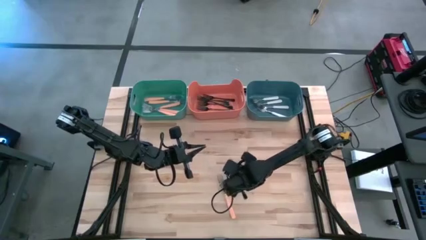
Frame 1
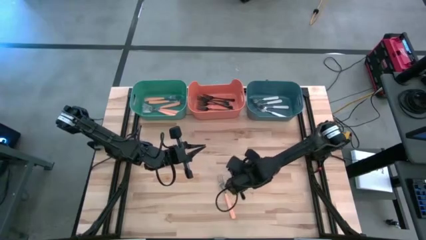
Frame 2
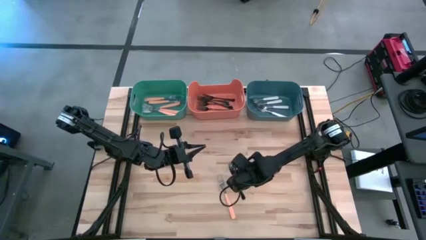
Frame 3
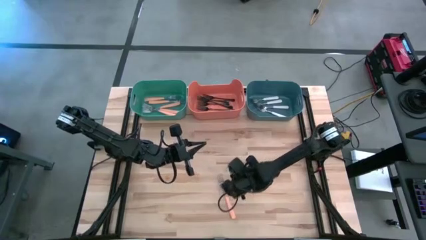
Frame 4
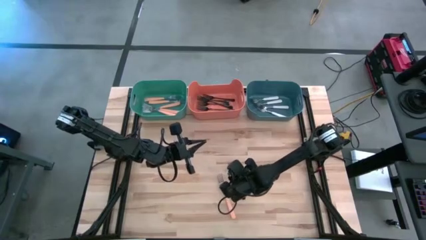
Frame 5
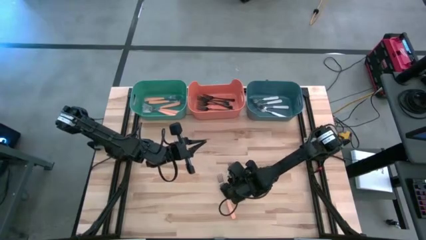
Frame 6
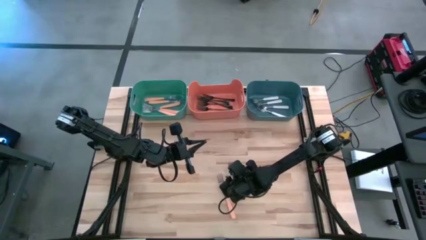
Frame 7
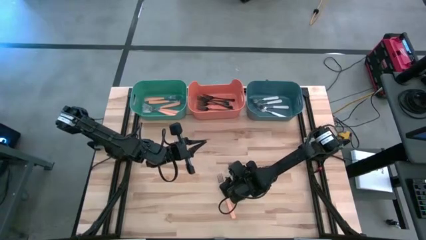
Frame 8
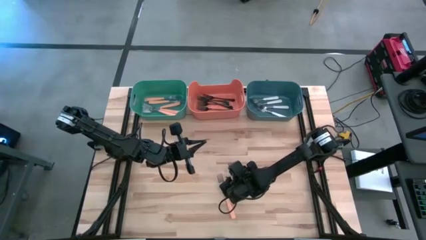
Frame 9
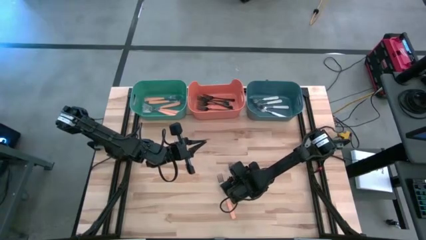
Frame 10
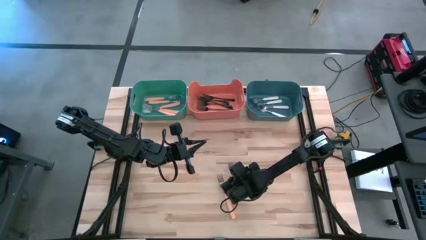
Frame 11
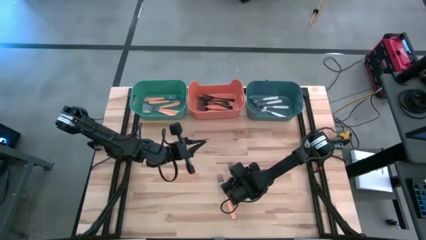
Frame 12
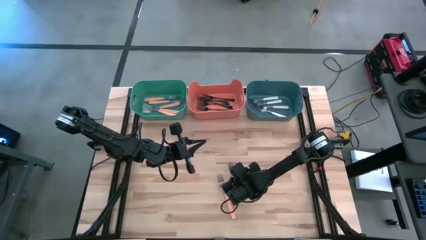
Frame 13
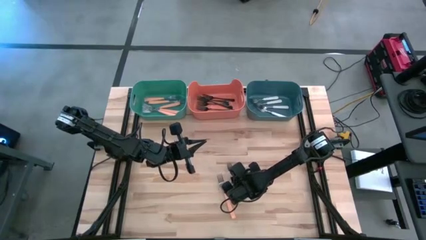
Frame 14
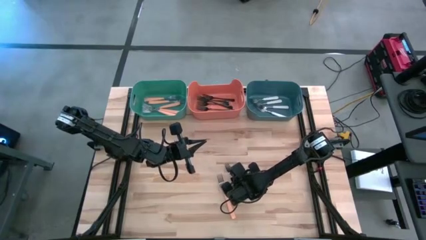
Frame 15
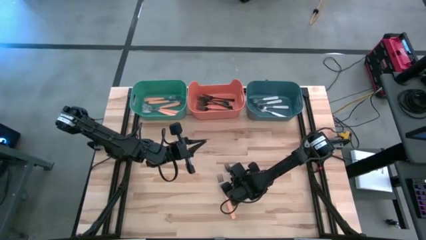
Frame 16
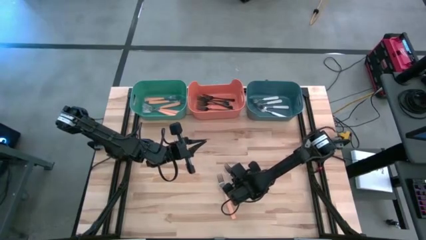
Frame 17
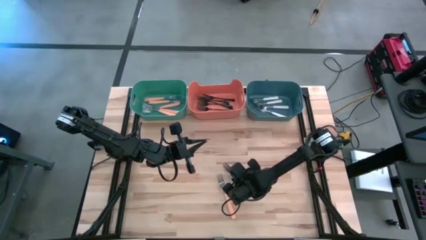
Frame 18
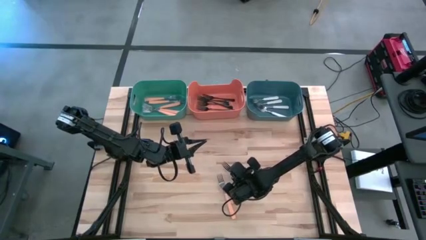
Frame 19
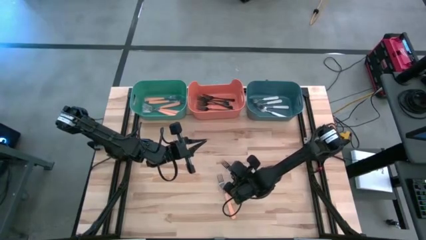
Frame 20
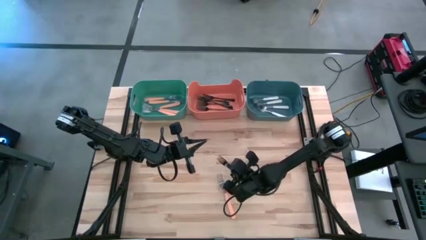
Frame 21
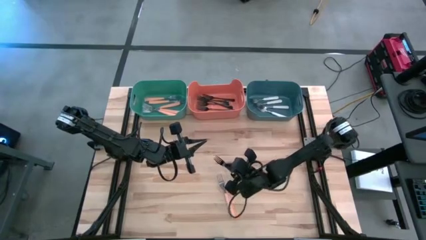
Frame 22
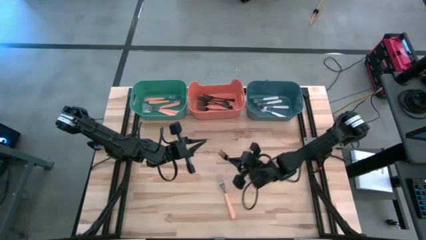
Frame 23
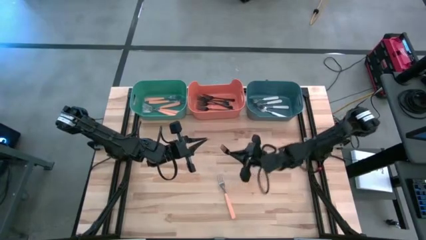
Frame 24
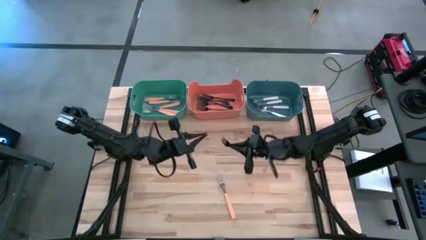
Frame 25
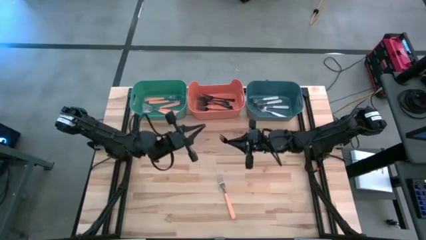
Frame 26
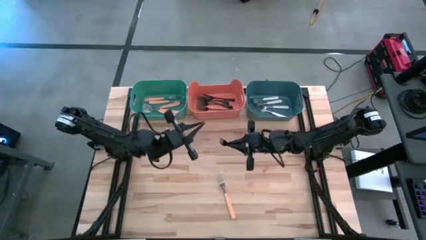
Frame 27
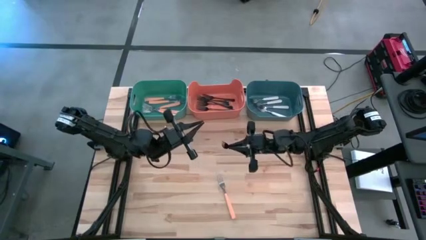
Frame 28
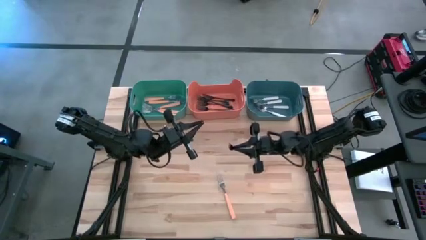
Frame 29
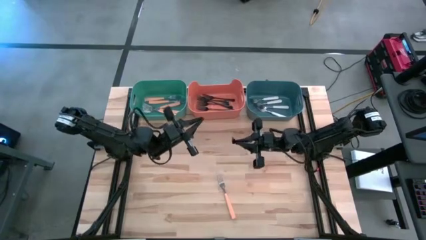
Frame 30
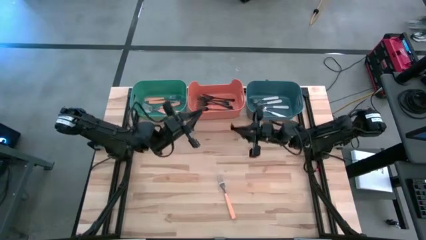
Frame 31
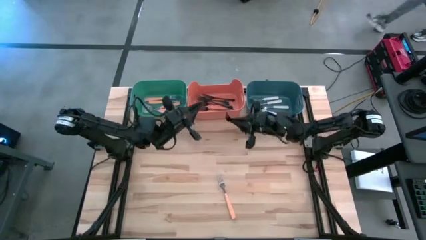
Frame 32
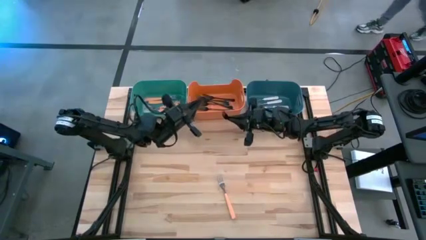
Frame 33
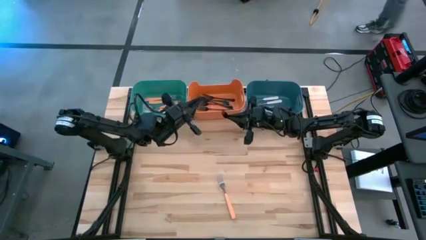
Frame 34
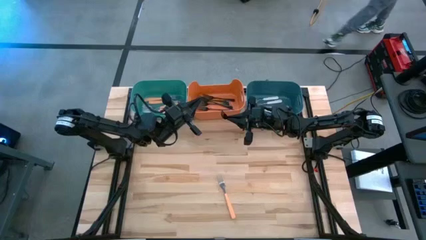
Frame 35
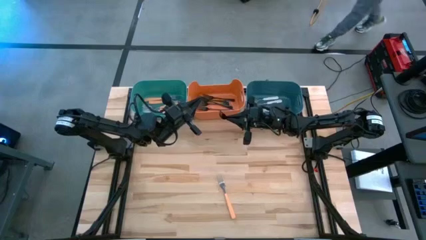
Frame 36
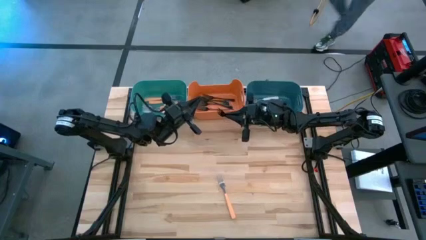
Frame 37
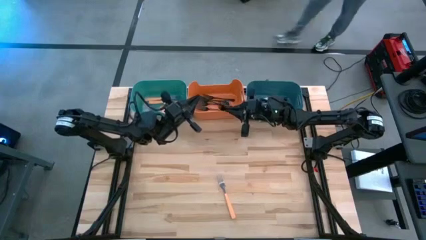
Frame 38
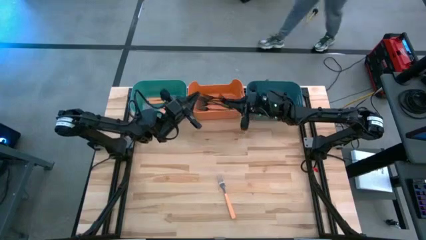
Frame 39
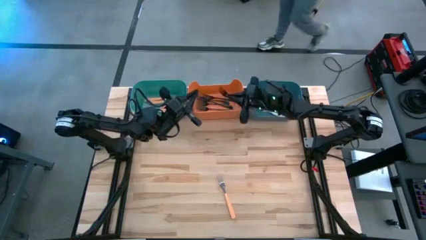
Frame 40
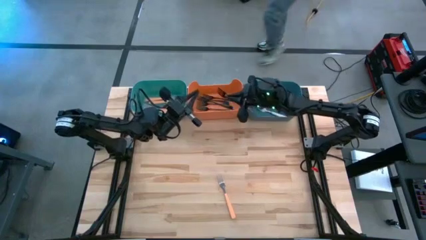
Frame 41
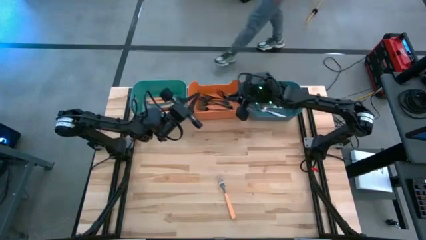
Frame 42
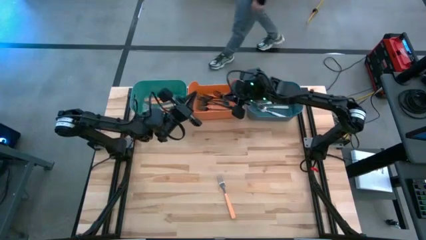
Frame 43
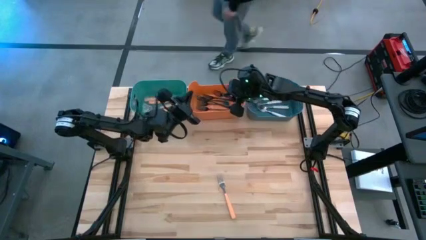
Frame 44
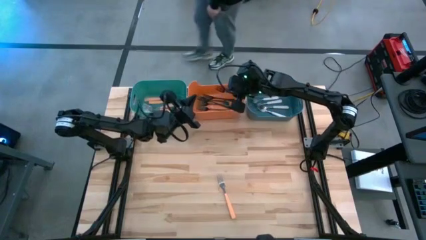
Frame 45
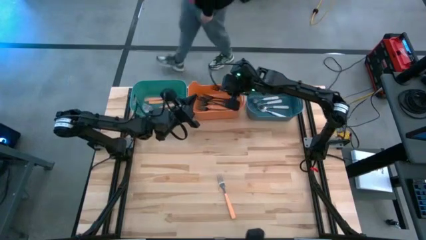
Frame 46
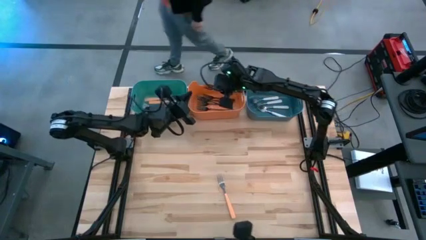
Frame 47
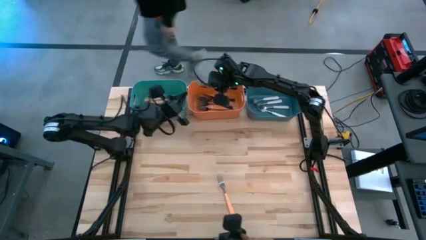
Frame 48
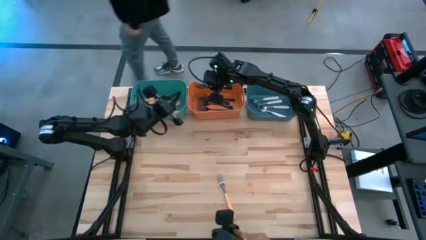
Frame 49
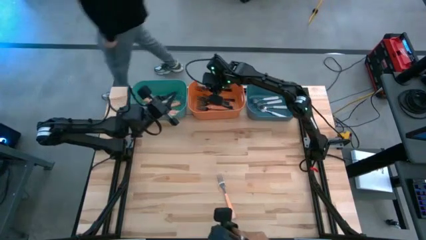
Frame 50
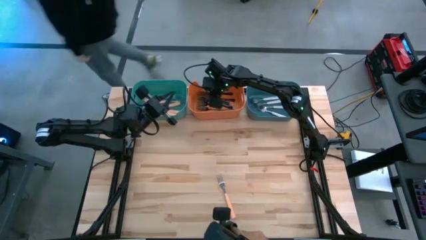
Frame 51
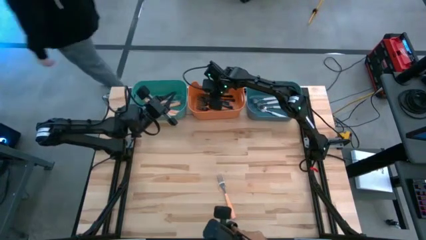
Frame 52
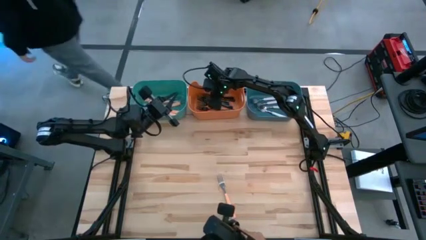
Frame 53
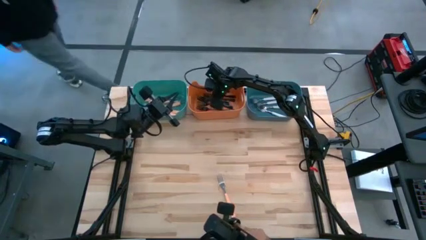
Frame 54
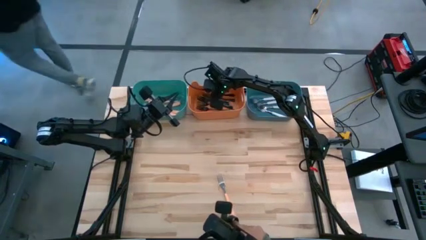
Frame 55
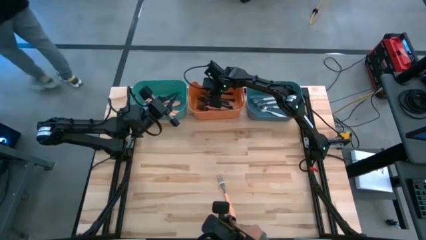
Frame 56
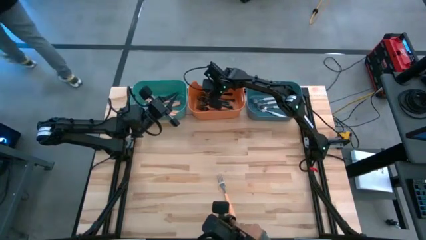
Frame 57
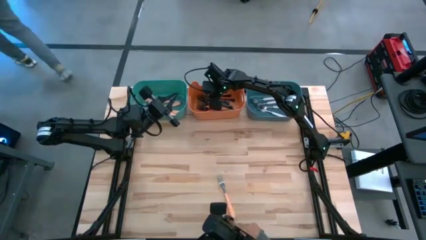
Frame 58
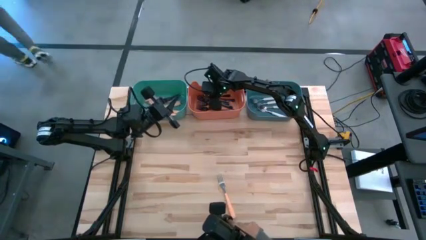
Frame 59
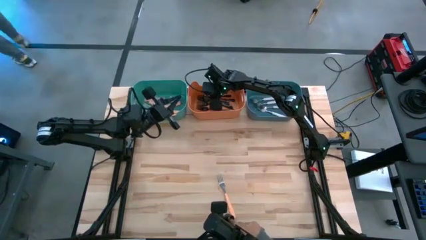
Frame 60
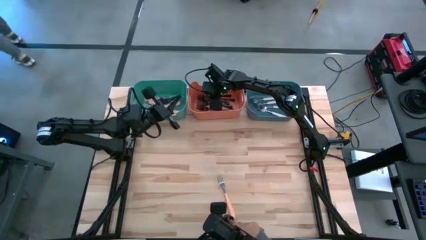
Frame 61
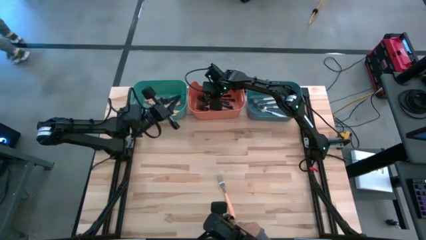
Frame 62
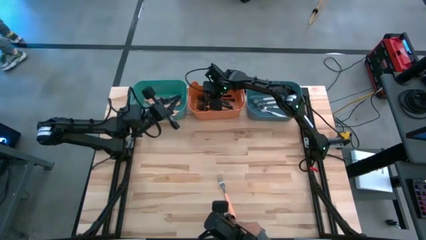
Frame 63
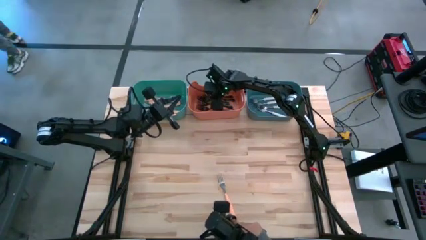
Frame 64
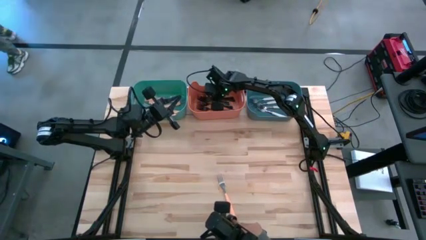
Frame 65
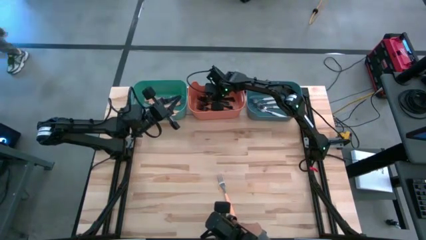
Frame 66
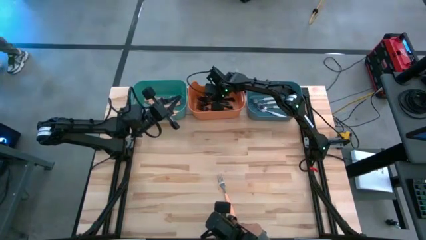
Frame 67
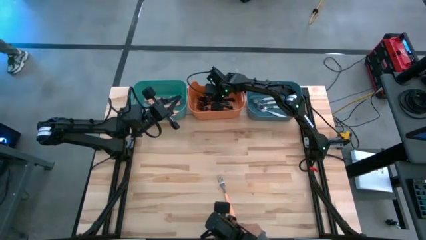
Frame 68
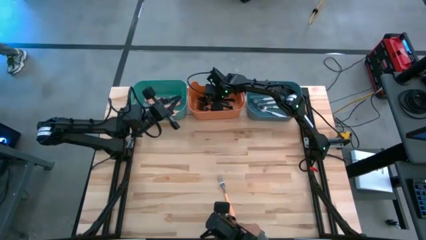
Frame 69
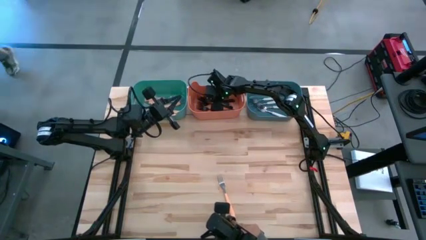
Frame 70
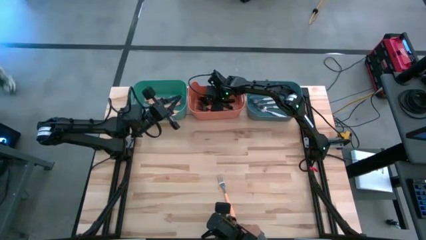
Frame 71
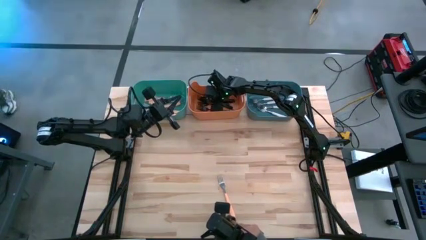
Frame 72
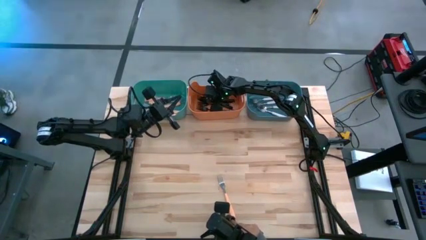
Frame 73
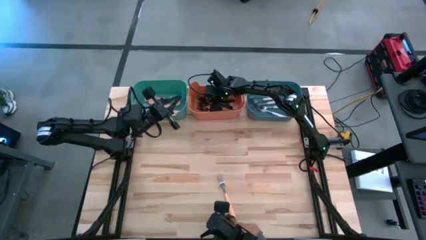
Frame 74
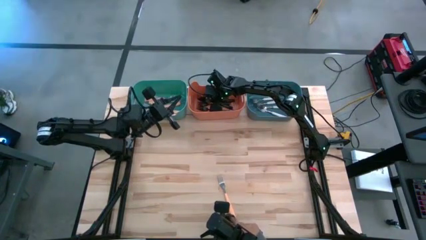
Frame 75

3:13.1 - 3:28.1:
Task: Sort silverware by color (type)
Put the black fork into the orange bin

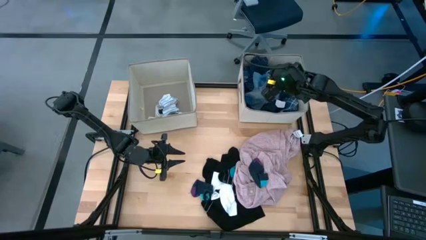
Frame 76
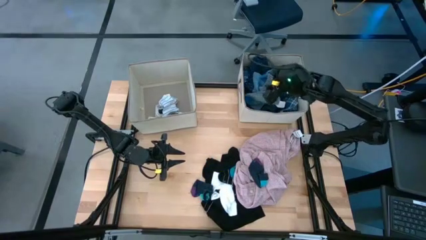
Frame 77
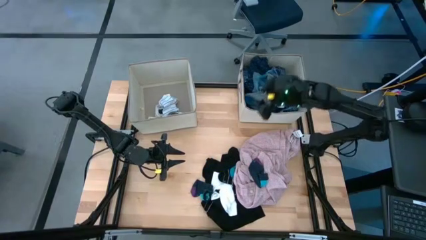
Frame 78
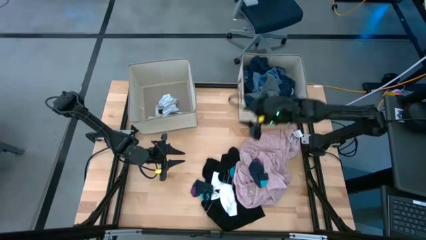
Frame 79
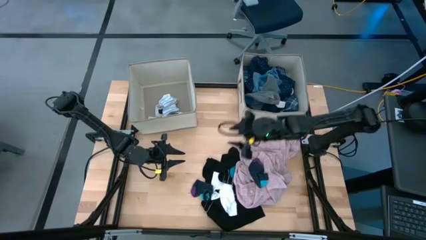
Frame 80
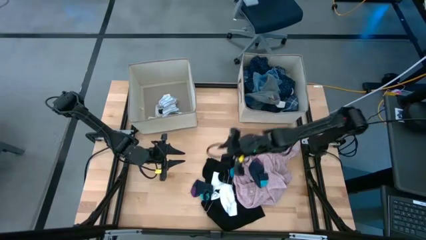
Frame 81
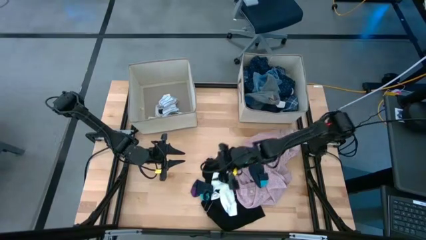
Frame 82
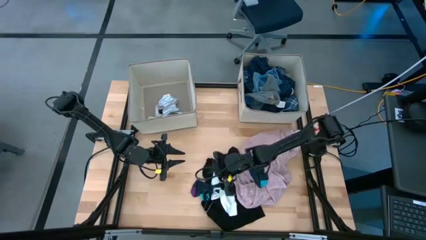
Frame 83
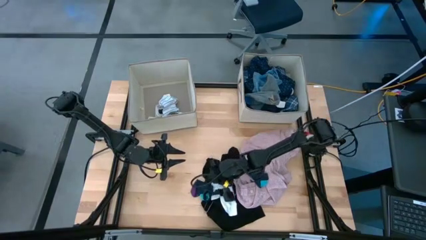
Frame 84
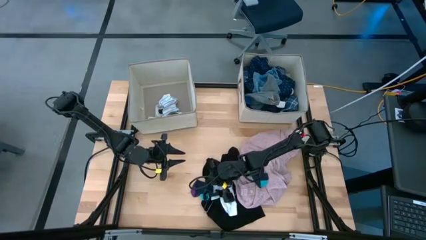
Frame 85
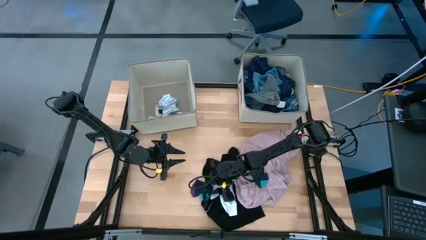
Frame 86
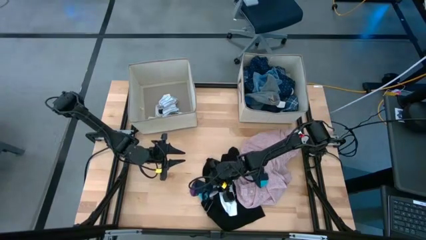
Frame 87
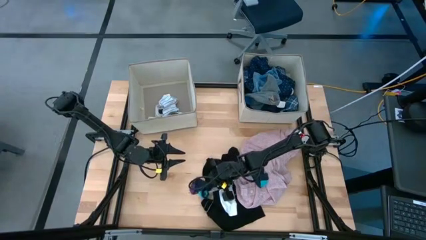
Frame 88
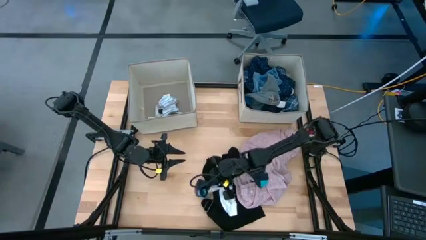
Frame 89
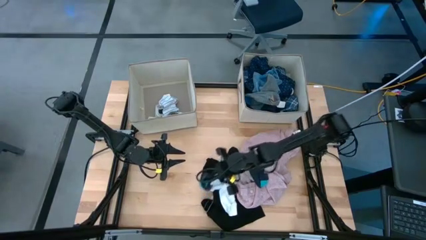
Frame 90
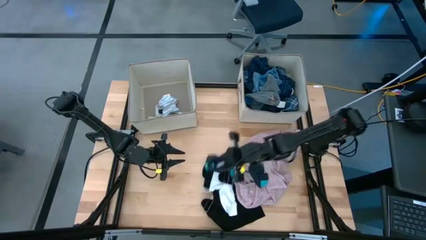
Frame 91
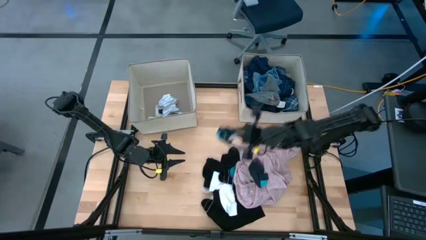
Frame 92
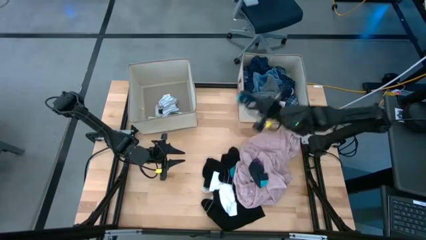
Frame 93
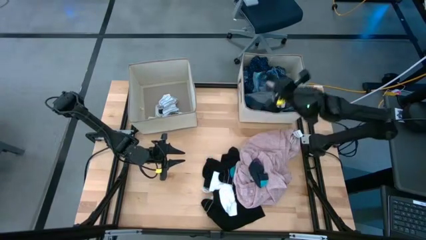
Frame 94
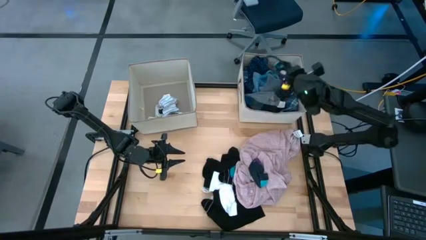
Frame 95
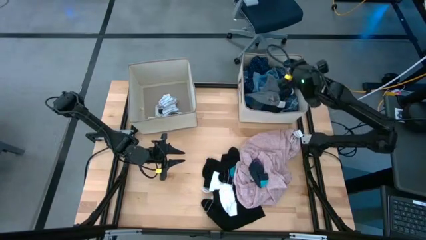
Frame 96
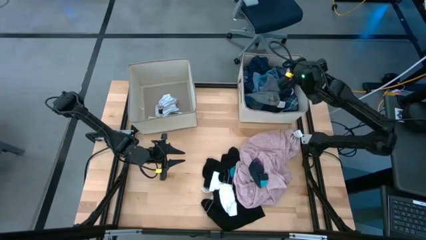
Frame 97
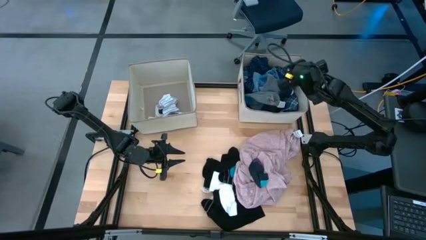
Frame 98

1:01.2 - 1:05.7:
Task: Sort clothes
Put the dark blue sock into the right laundry bin
